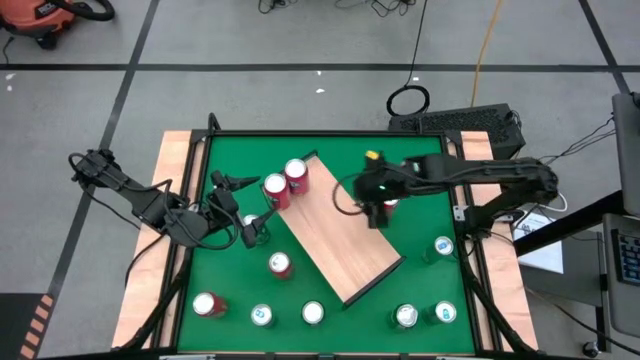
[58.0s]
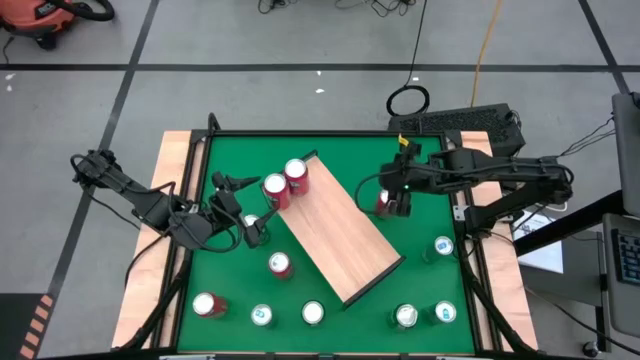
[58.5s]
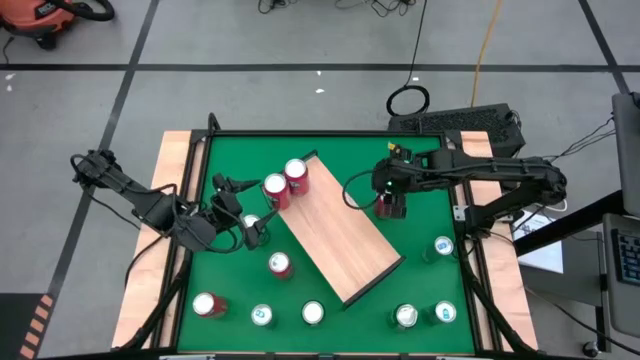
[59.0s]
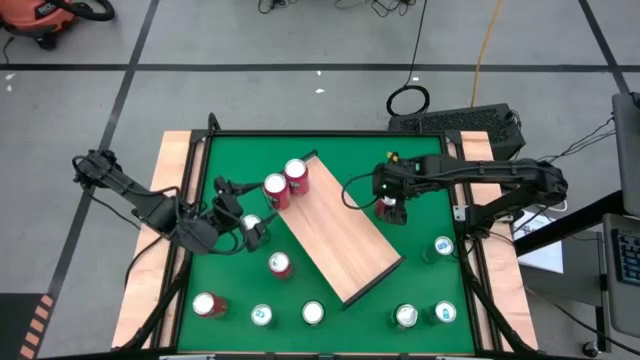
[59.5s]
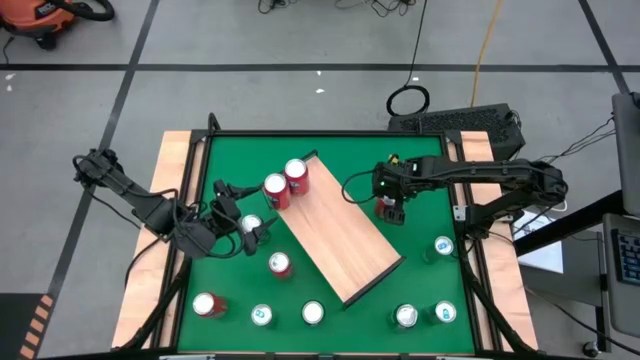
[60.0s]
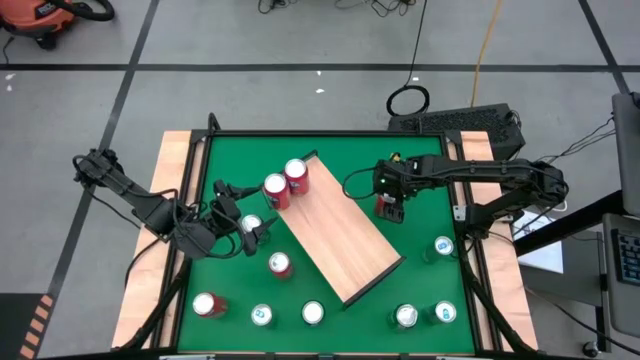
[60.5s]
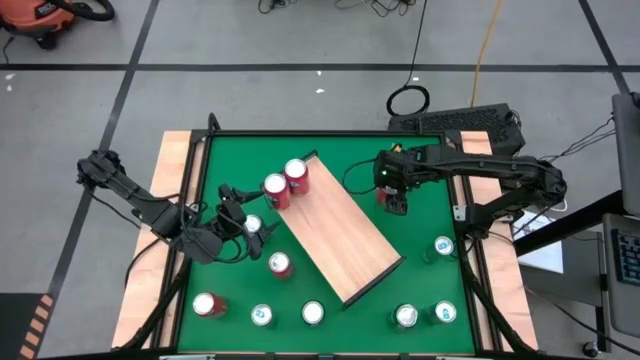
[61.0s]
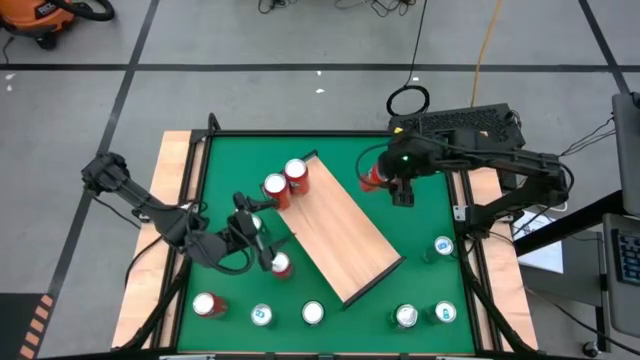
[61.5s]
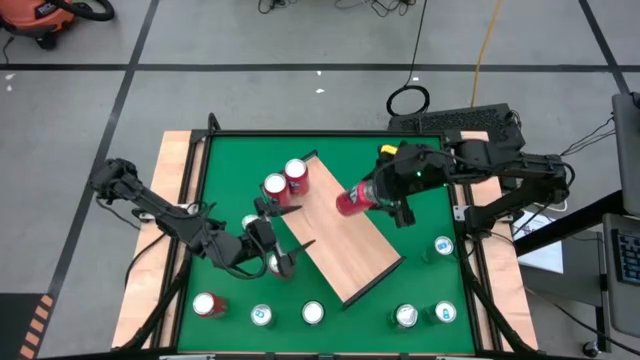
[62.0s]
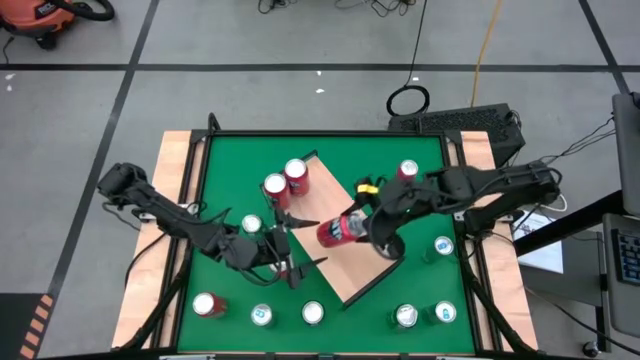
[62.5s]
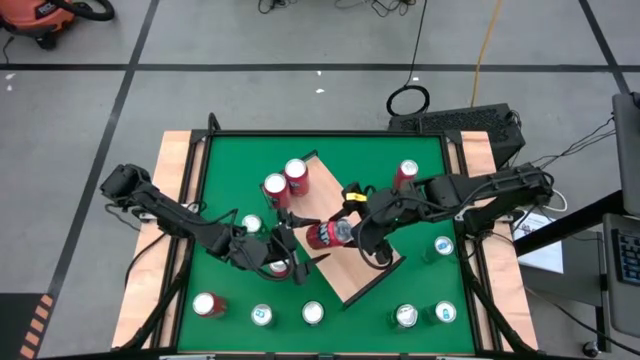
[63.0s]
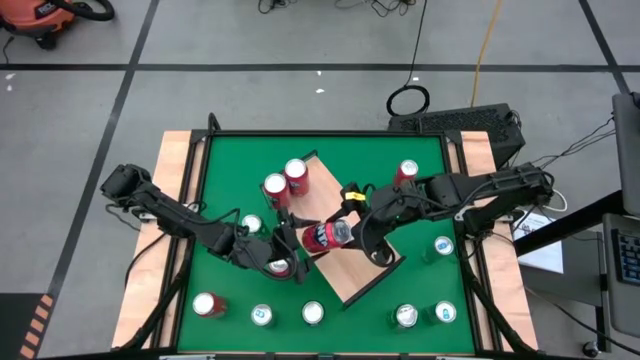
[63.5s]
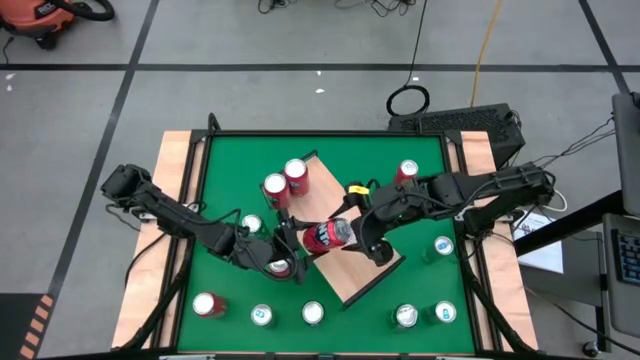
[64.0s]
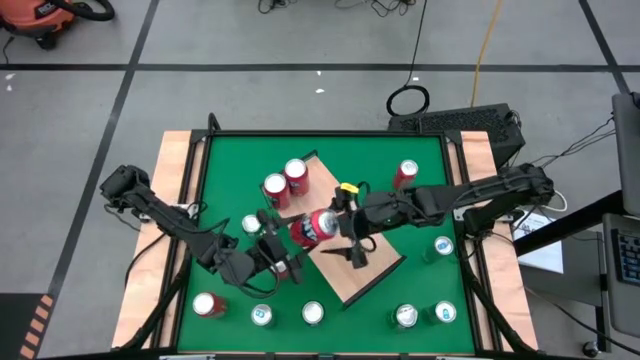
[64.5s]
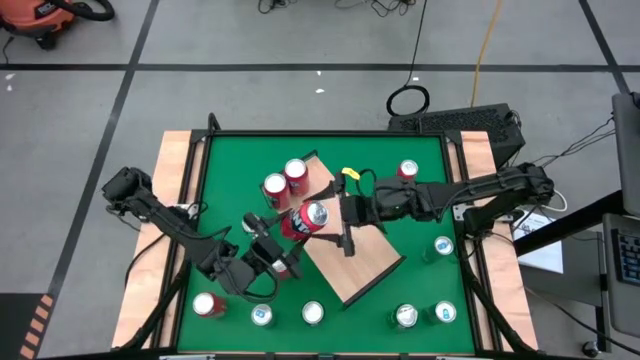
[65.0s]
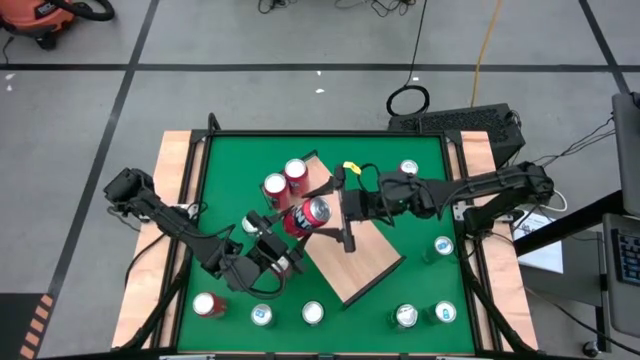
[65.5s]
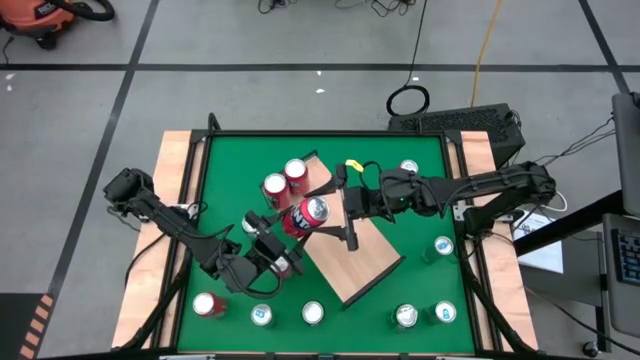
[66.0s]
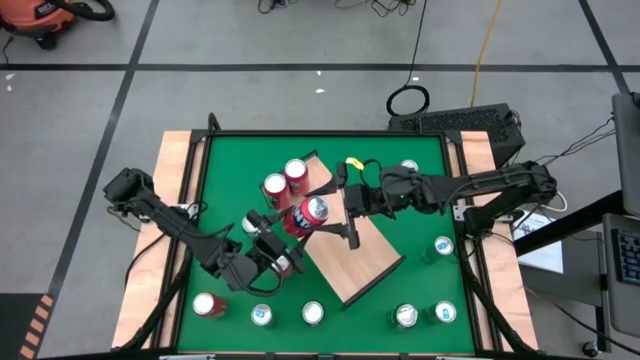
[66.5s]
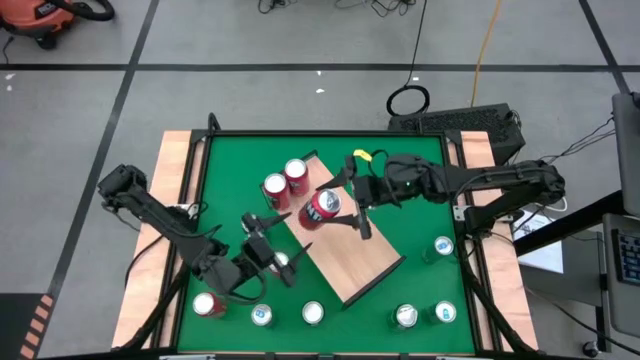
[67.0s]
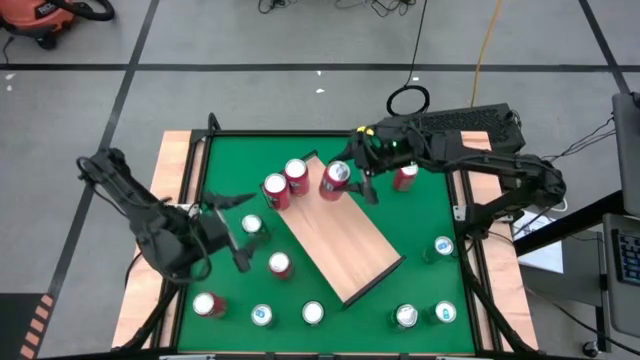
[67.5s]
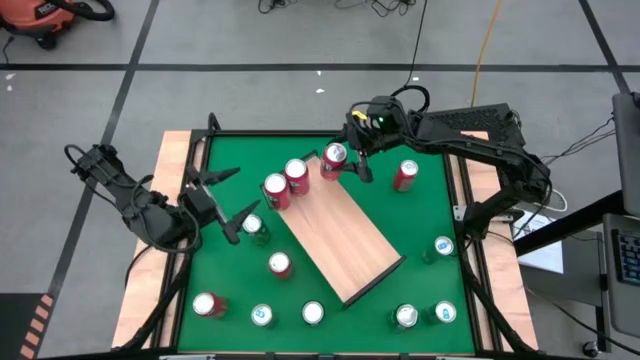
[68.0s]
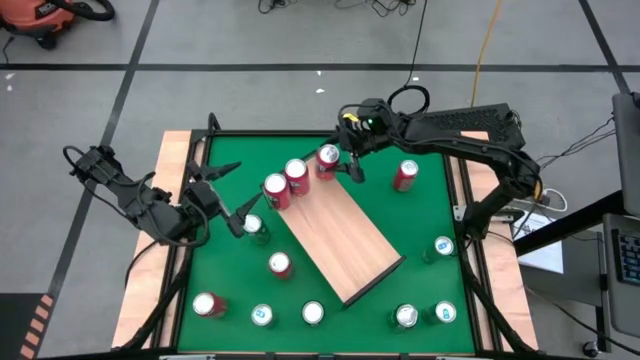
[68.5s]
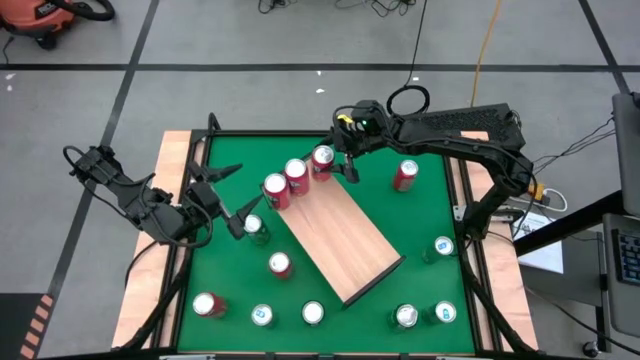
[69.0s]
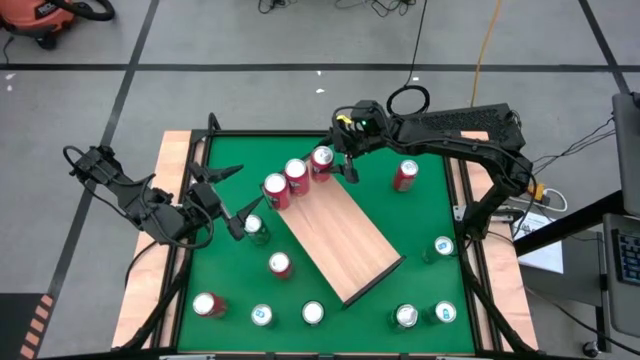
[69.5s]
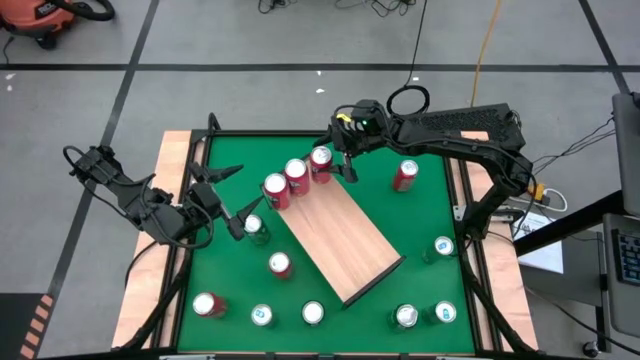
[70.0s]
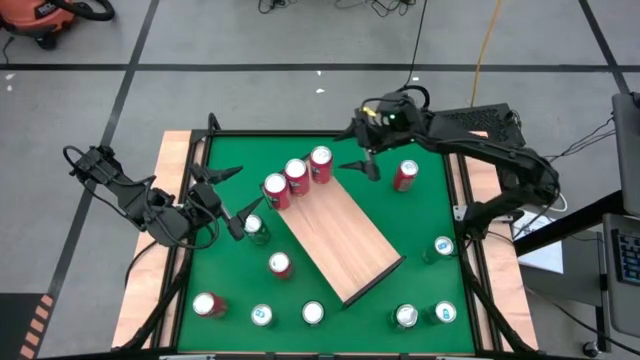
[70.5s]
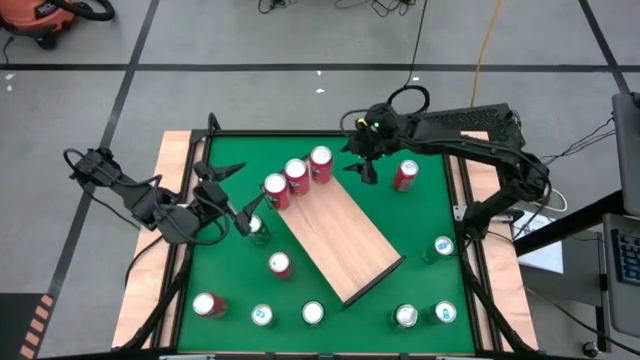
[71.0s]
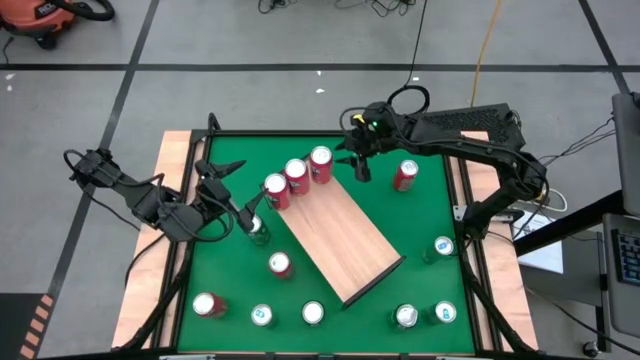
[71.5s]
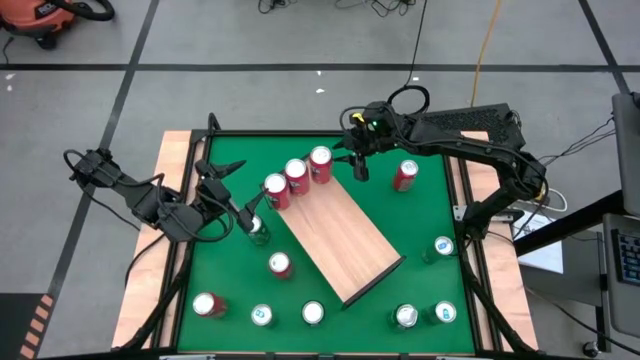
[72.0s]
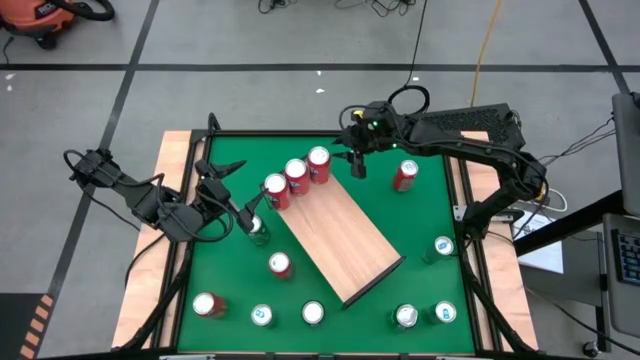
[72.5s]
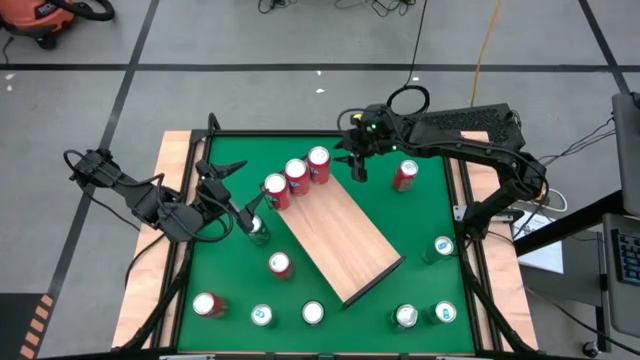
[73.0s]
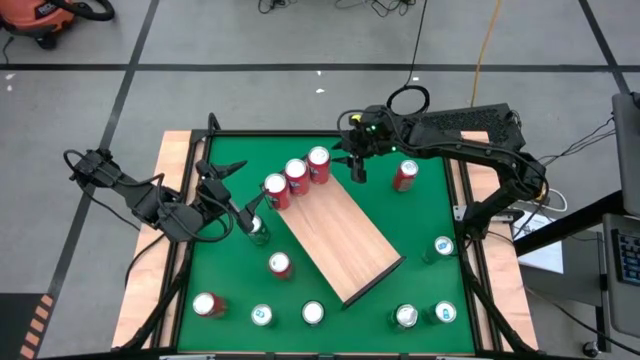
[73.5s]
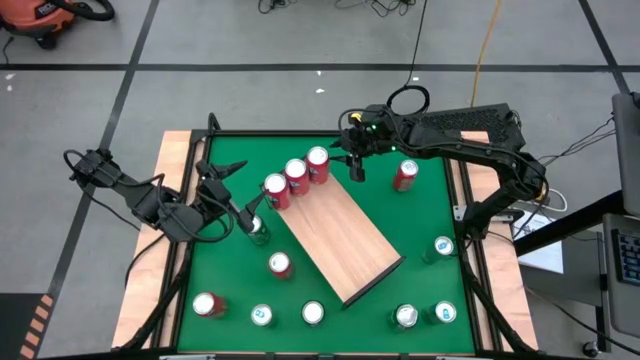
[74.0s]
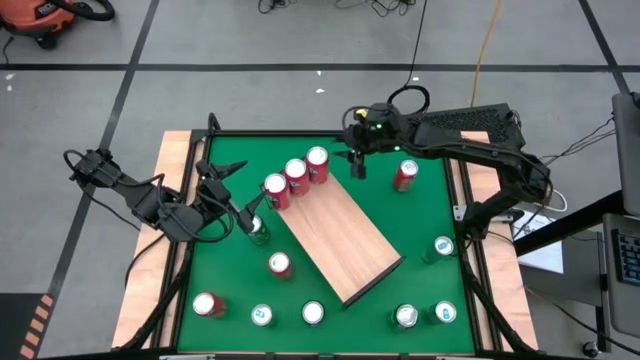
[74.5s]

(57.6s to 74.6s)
Task: Place canned beverage on shelf
Put the red soda can on the shelf aligned with the other red soda can

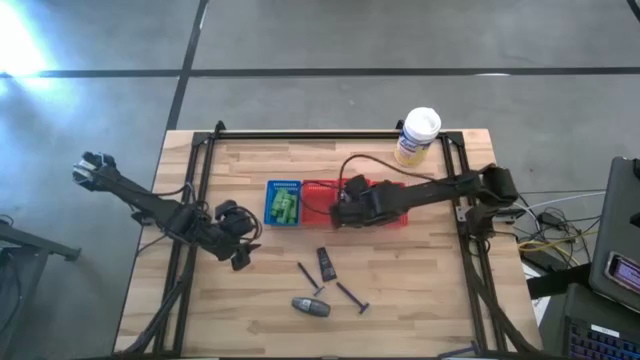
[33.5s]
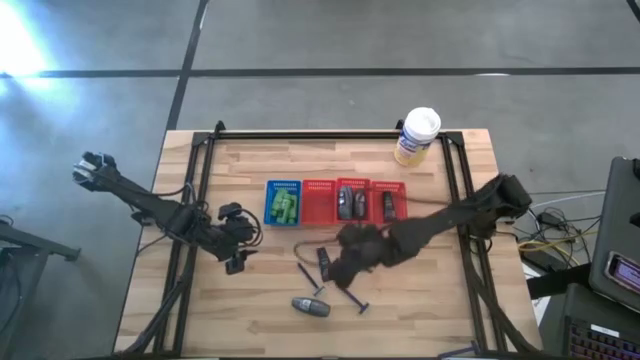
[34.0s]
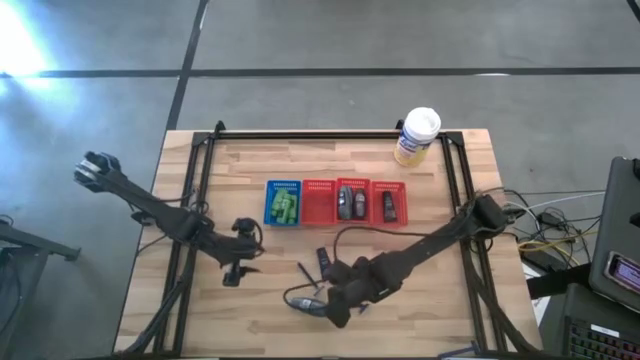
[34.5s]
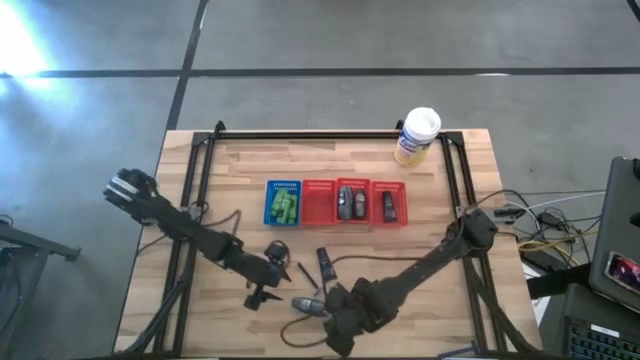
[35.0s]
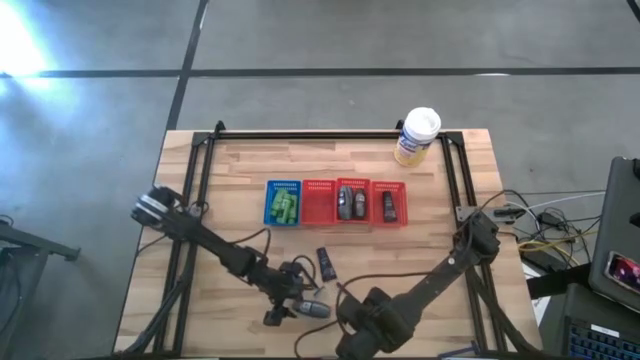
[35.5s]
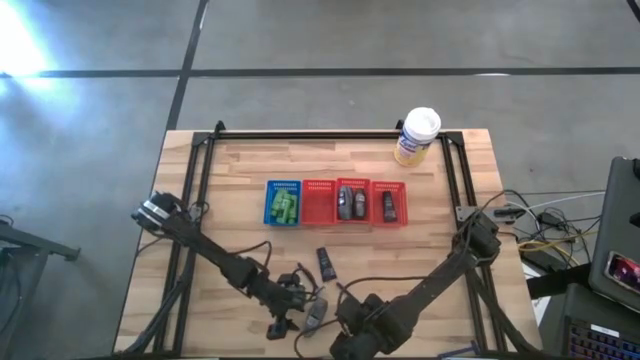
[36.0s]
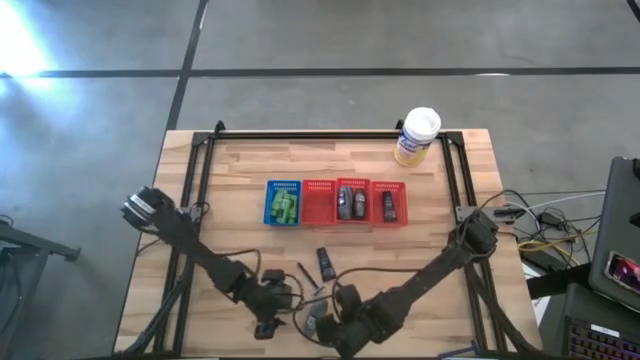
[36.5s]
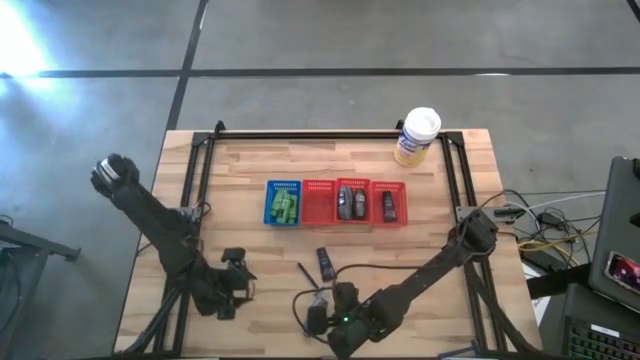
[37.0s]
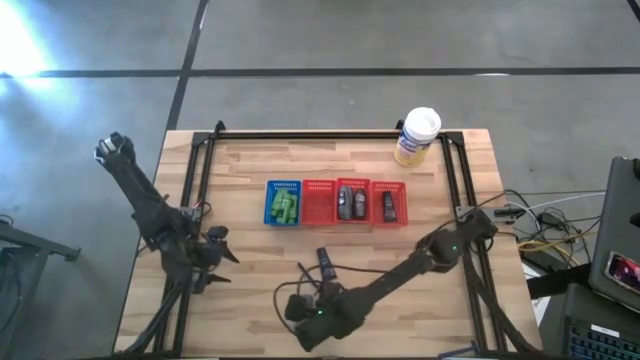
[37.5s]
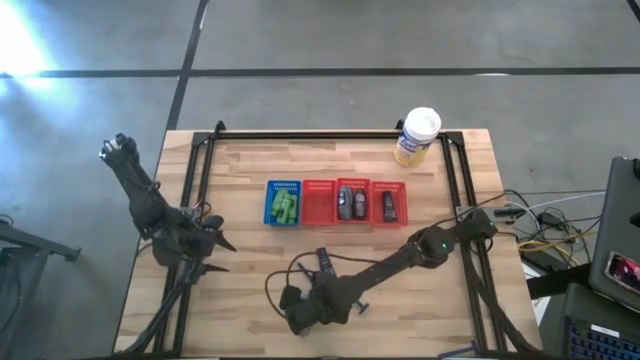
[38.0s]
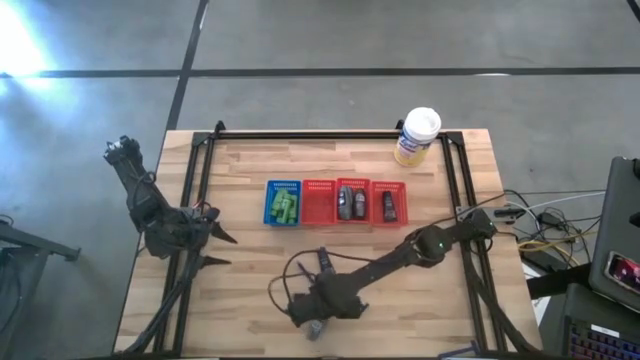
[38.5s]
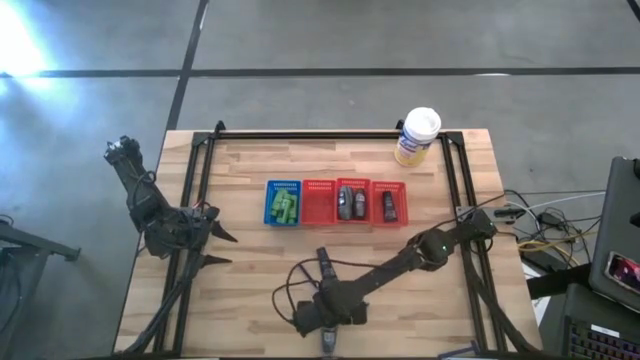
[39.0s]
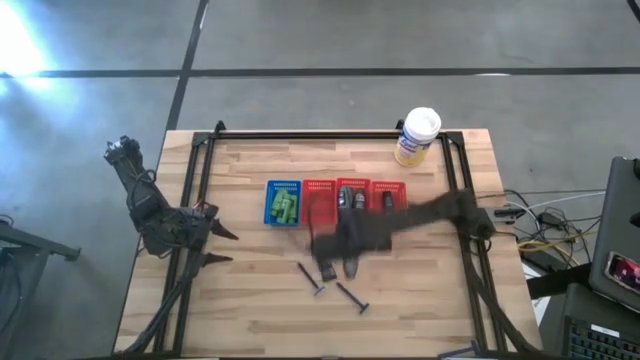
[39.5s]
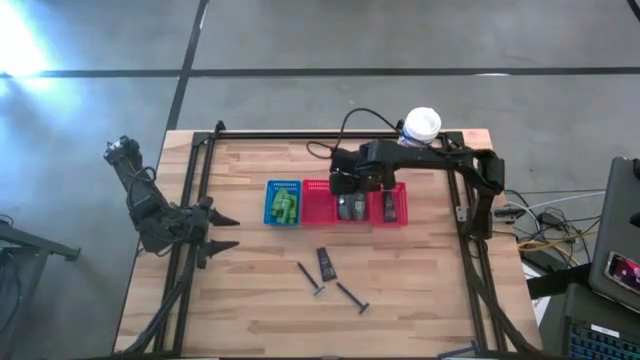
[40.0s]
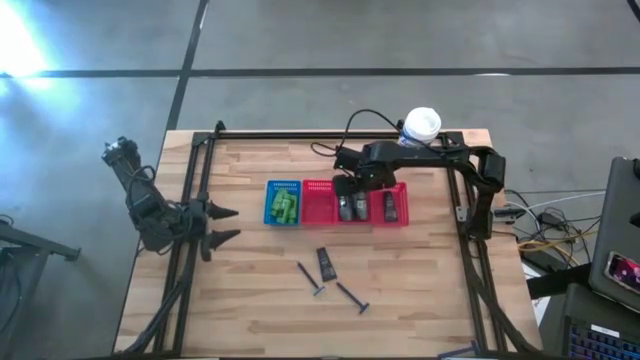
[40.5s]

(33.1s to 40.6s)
Task: Pick & Place Travel size toiletries
Put the gray deodorant into the middle red bin
